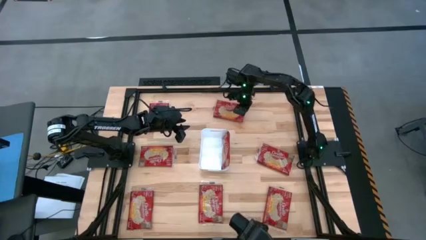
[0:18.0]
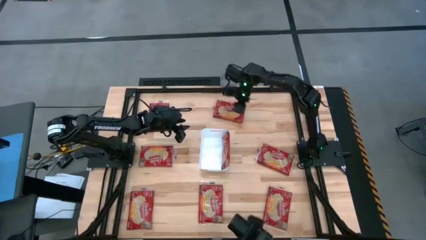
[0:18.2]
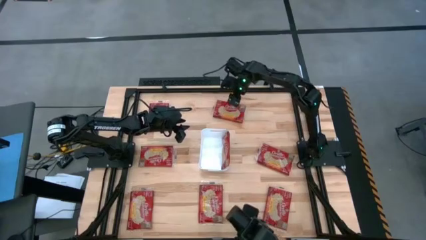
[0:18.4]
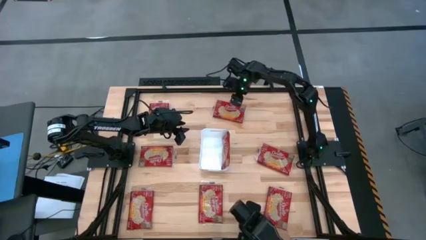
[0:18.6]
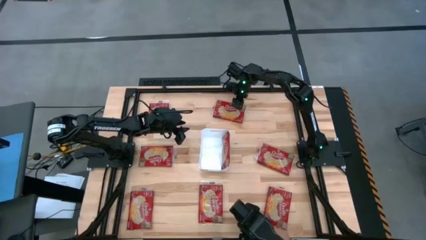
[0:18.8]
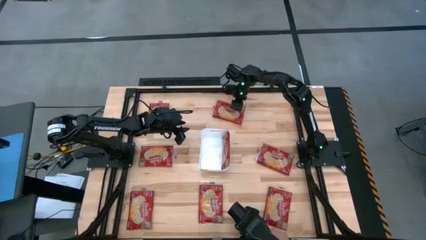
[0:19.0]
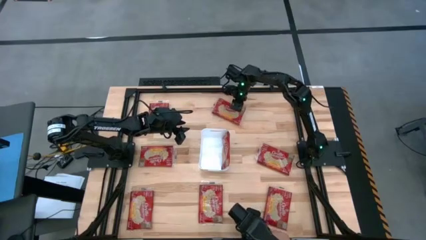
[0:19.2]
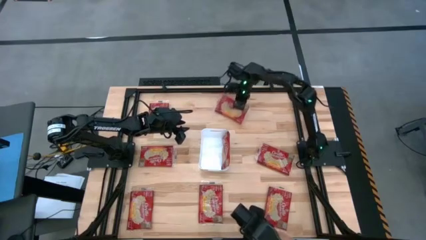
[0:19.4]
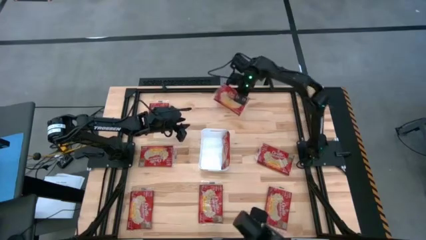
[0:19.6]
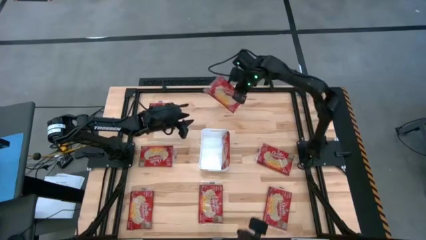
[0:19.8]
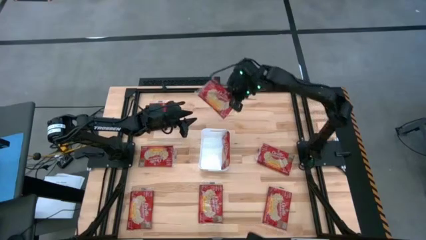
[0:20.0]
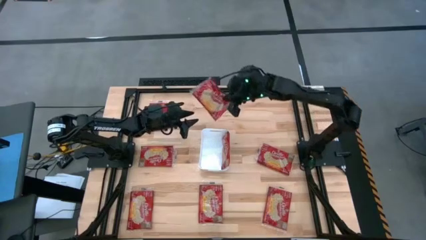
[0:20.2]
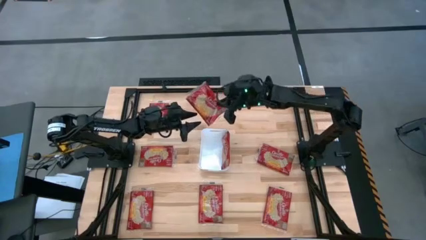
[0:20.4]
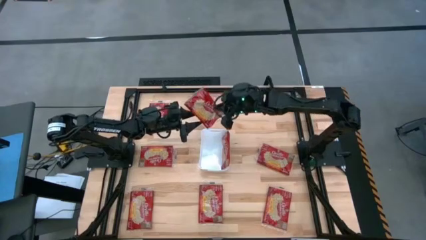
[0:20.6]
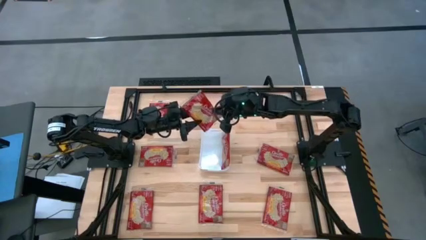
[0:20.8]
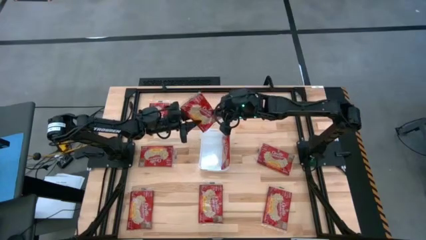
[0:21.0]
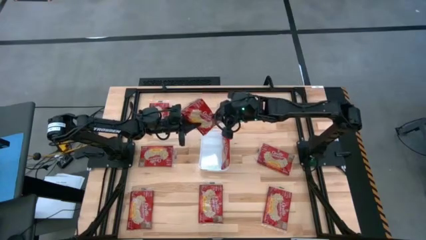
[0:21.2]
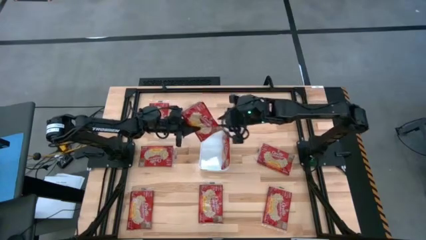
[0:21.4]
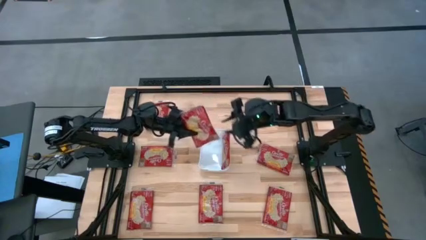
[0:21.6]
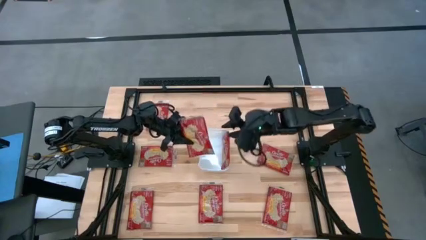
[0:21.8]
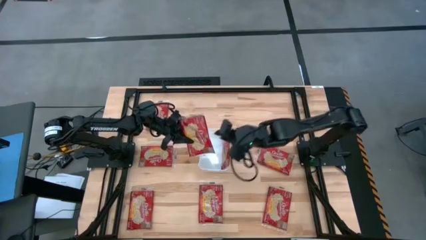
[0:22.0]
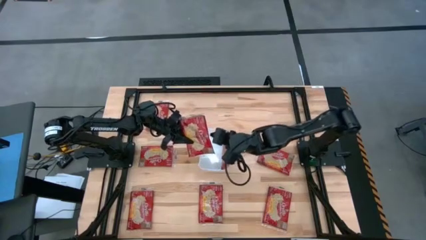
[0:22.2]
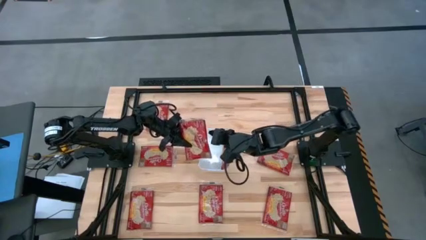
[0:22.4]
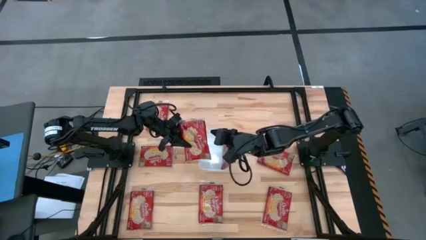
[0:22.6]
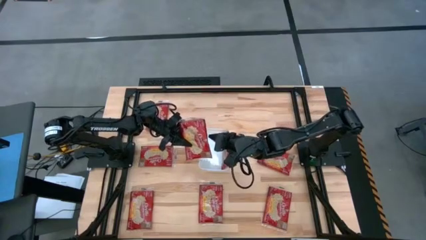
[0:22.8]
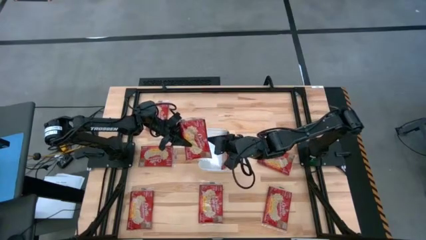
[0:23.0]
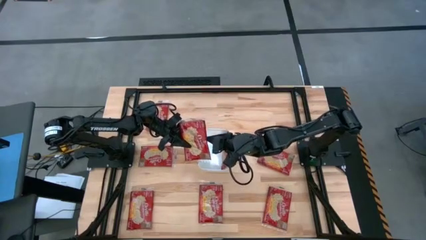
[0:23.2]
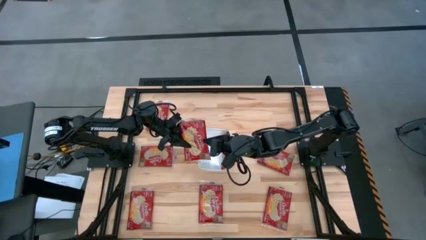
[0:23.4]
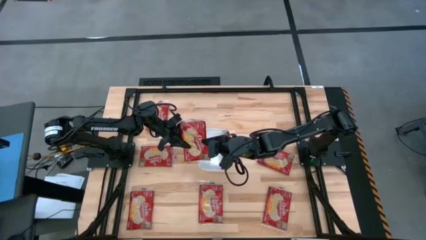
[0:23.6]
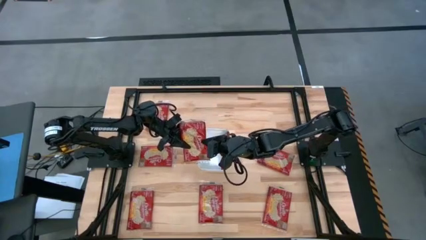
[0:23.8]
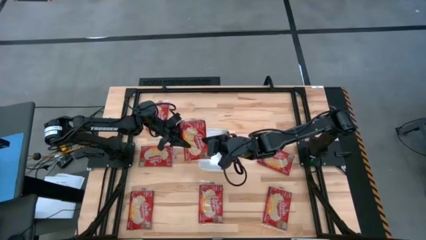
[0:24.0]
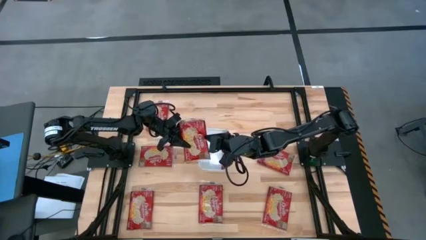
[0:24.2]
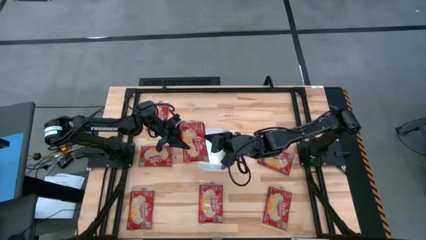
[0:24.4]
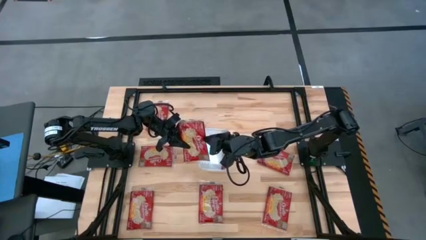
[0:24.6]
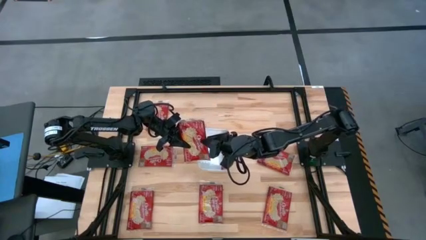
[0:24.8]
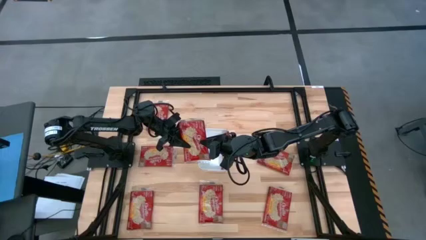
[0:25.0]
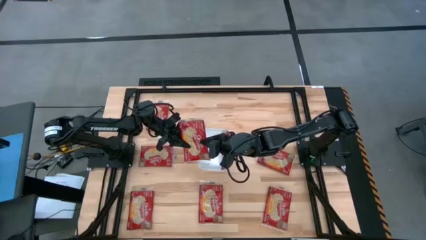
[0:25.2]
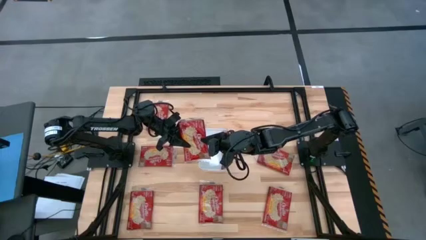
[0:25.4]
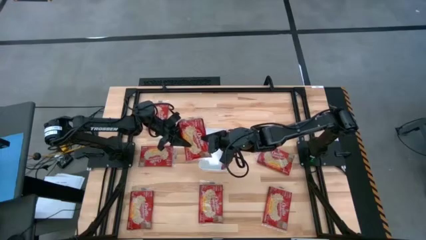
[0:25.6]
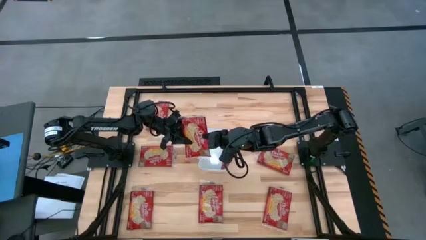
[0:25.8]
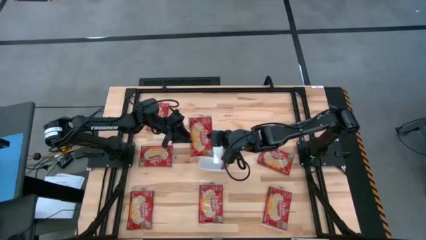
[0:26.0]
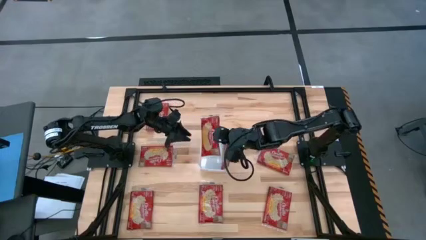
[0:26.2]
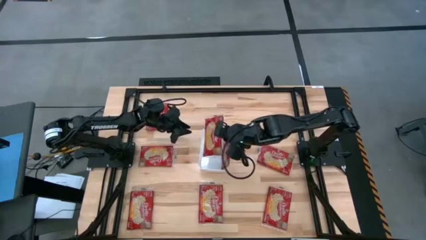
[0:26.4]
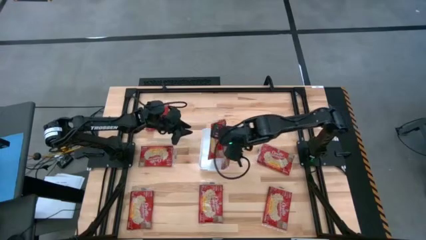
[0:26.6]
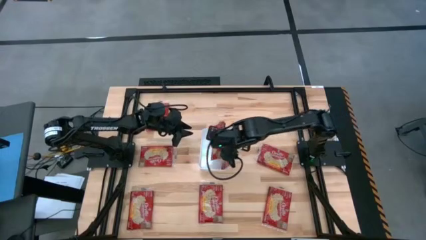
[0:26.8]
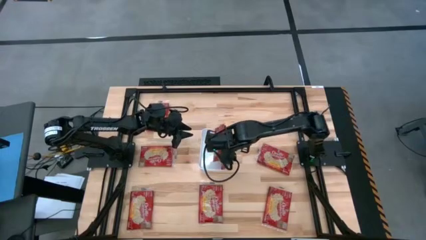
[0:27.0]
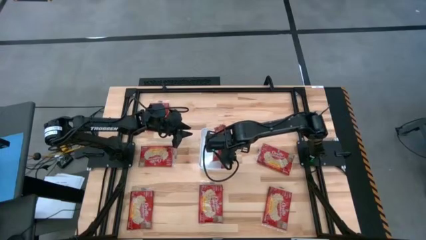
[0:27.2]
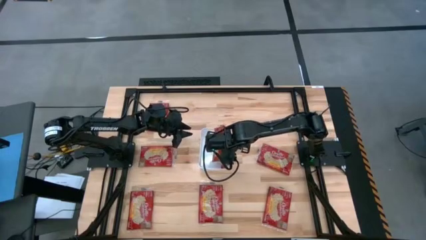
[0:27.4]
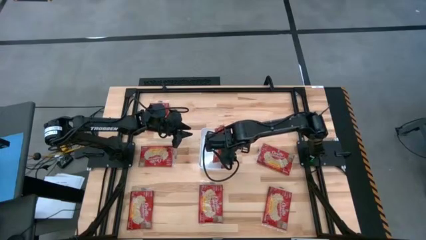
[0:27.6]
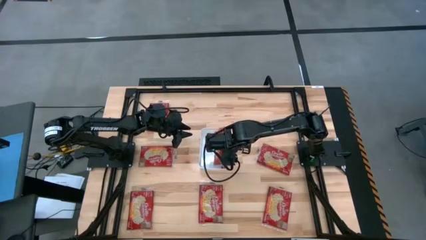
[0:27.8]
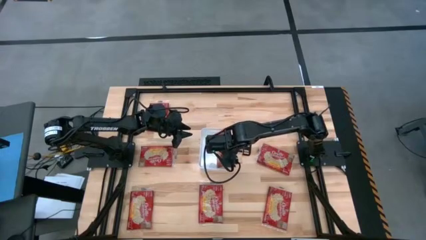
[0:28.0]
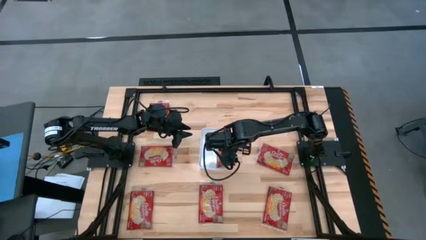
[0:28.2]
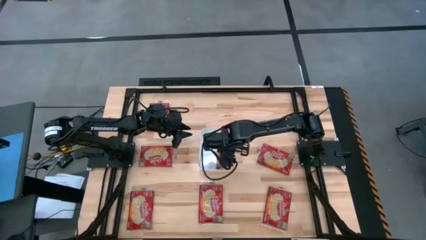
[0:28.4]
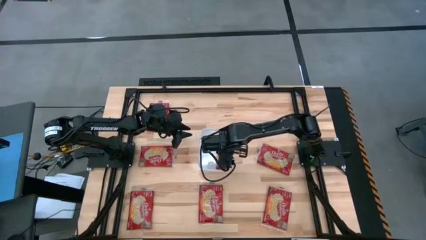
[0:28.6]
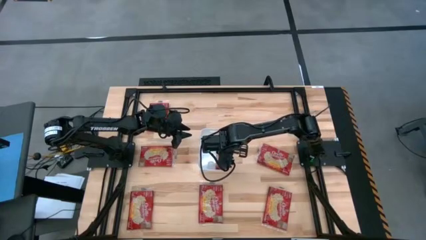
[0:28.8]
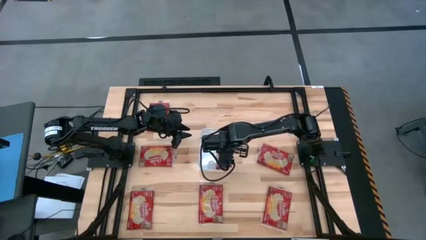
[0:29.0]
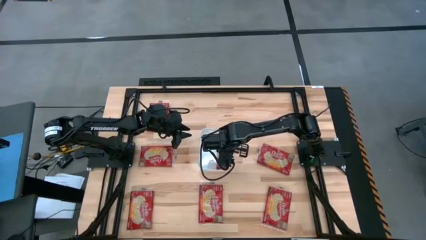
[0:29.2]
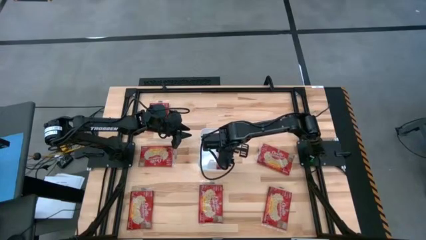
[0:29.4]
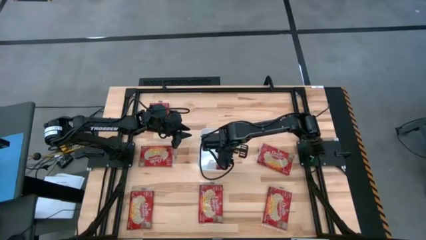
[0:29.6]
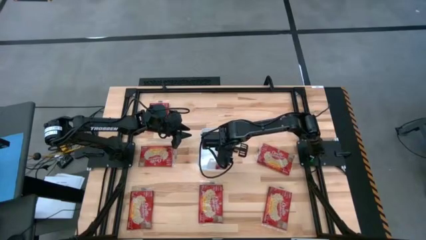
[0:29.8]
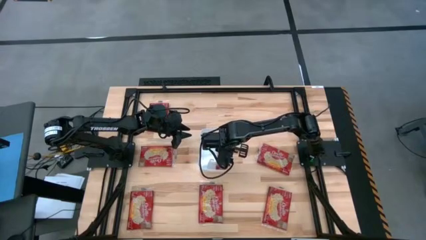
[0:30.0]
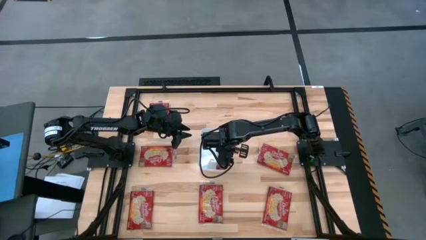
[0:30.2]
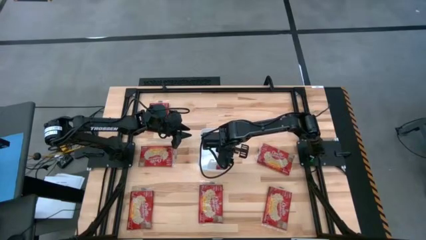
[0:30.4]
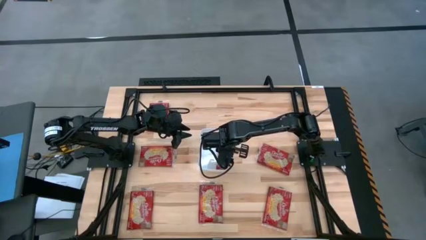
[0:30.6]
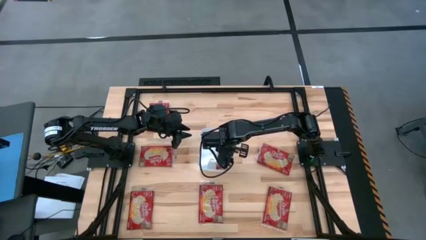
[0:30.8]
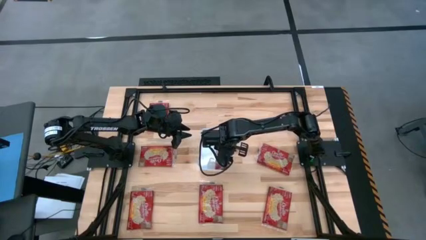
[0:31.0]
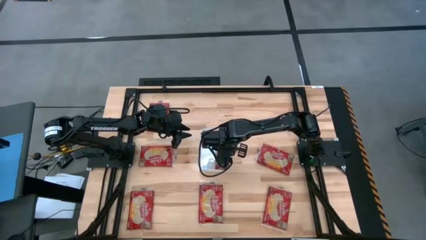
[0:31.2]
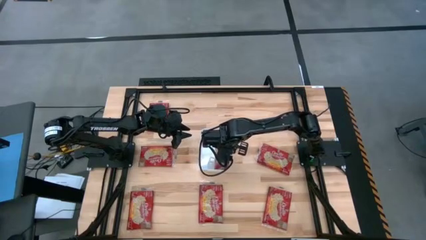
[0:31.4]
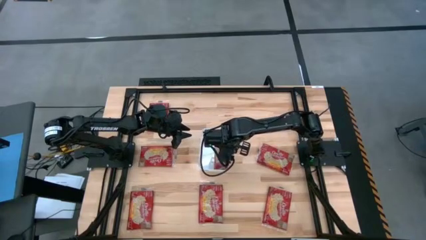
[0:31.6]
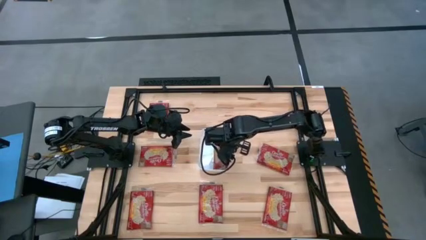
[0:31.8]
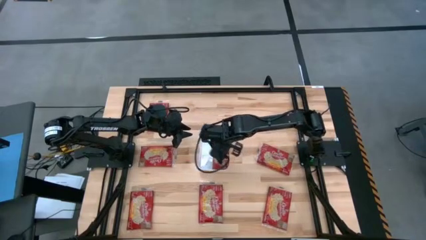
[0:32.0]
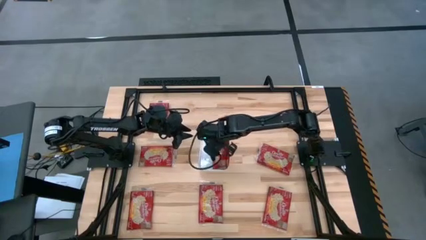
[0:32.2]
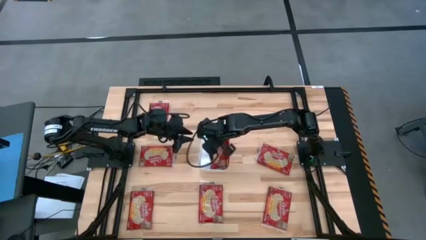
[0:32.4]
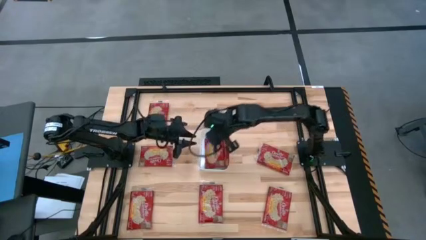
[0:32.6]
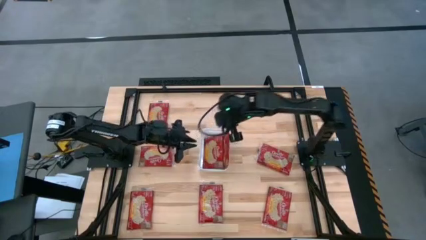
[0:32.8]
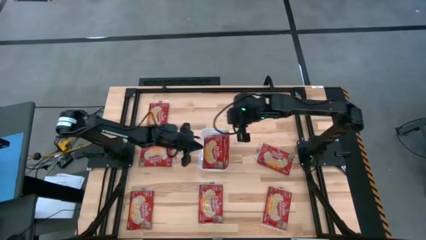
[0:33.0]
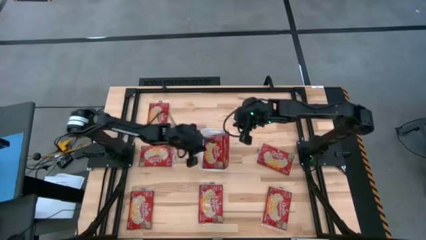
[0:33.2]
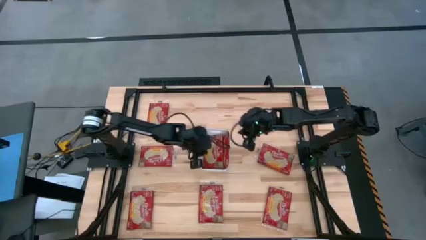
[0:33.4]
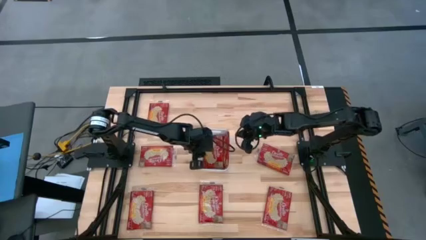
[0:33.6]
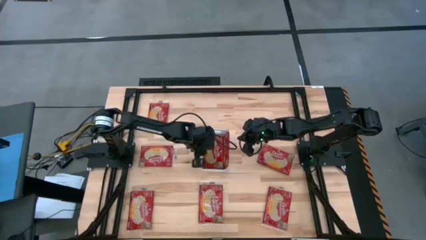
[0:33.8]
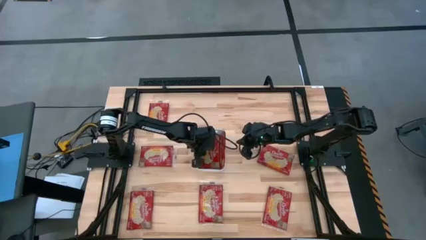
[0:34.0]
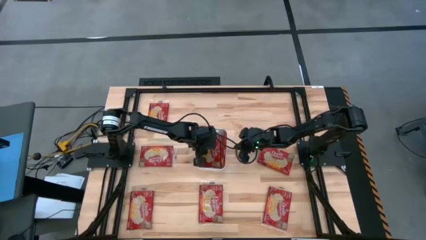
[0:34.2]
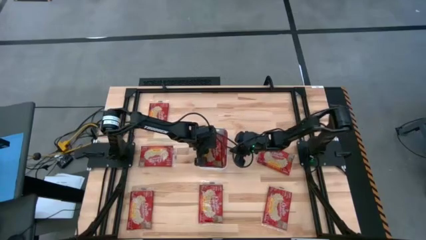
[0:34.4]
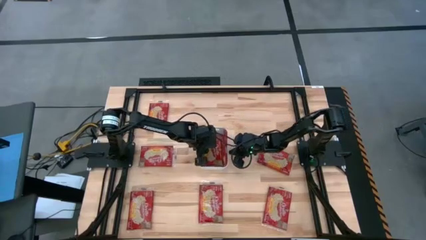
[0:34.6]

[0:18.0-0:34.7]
Task: Sort popcorn bags into baskets
Put the red popcorn bag into the white bin
